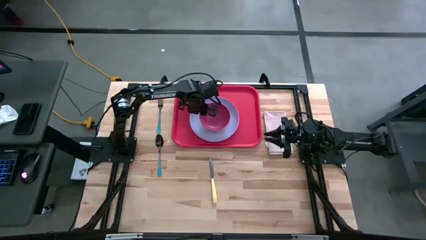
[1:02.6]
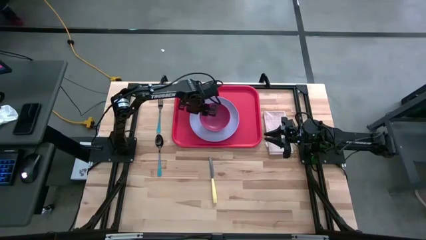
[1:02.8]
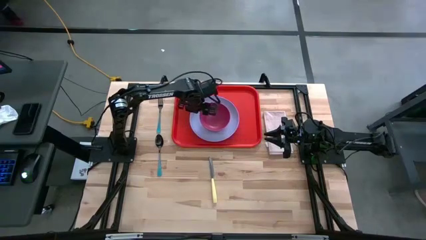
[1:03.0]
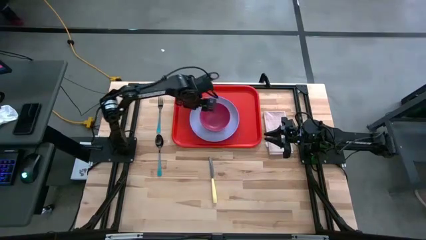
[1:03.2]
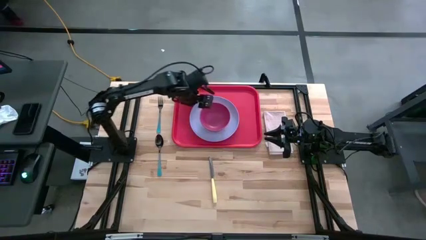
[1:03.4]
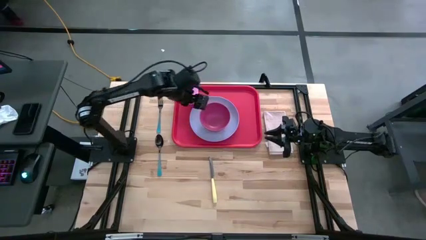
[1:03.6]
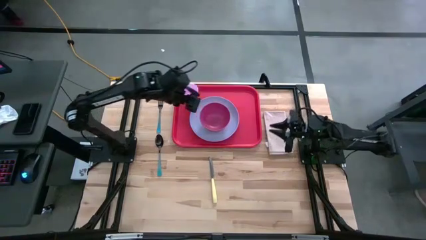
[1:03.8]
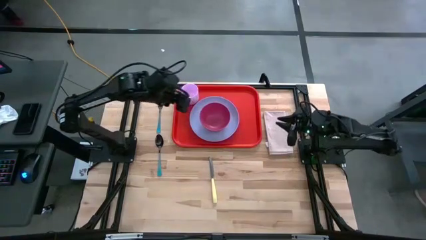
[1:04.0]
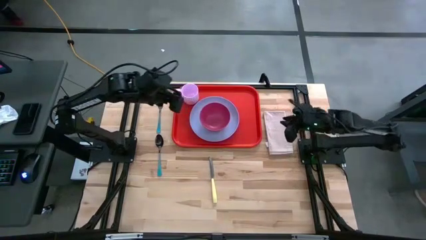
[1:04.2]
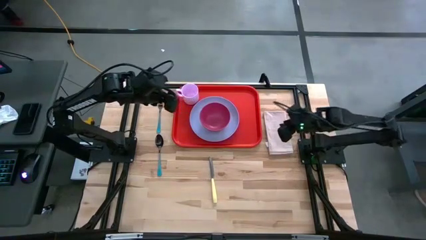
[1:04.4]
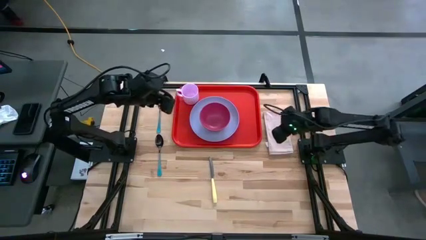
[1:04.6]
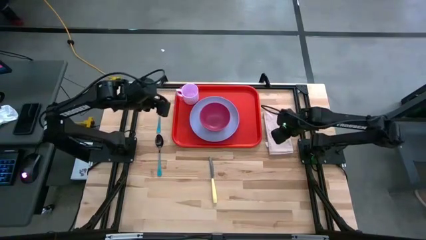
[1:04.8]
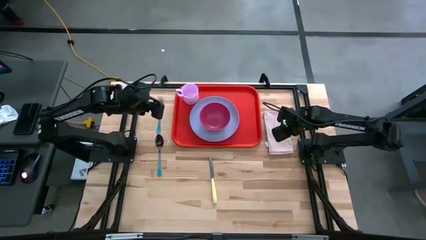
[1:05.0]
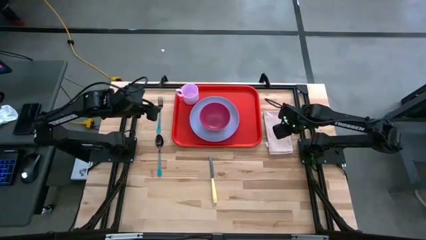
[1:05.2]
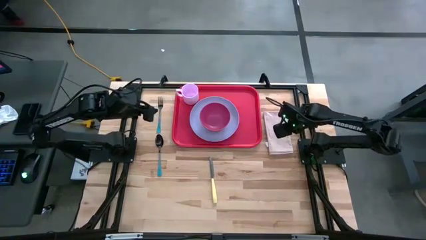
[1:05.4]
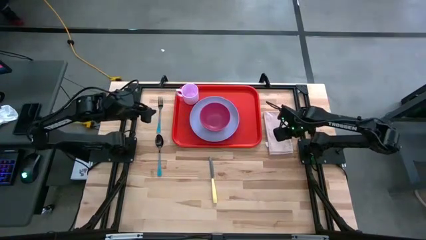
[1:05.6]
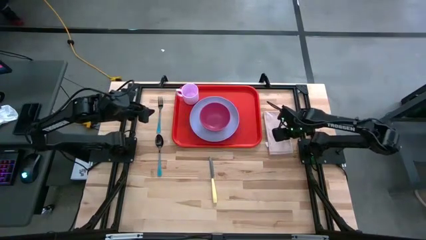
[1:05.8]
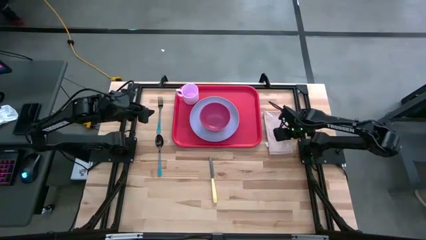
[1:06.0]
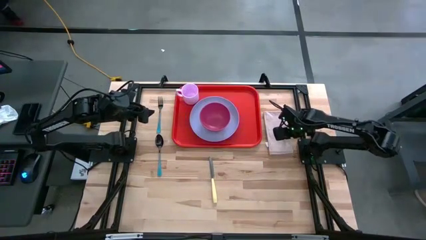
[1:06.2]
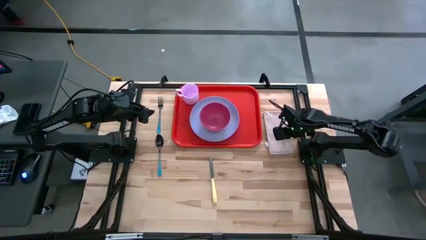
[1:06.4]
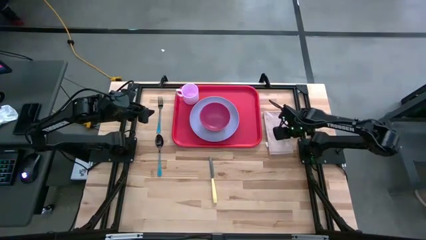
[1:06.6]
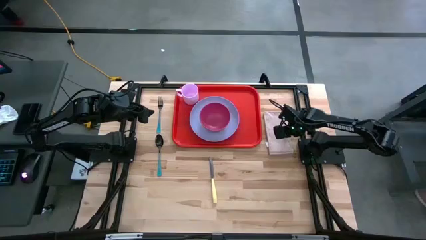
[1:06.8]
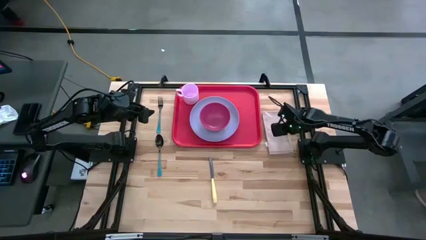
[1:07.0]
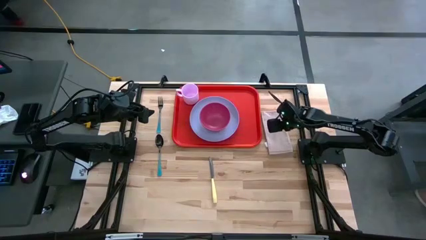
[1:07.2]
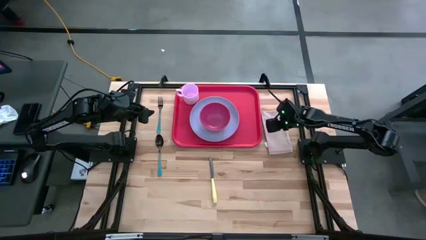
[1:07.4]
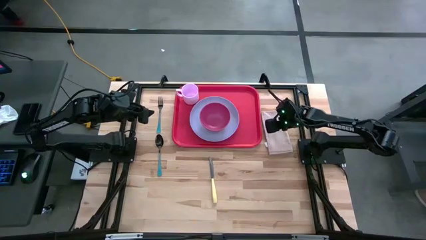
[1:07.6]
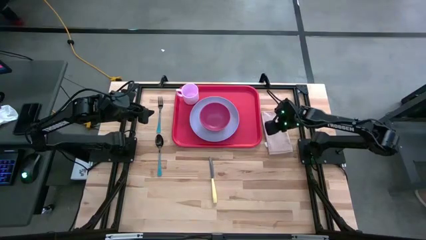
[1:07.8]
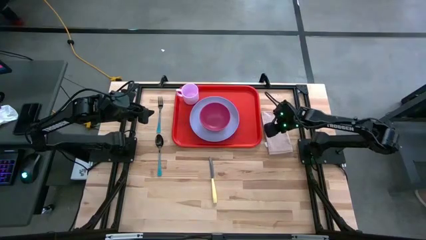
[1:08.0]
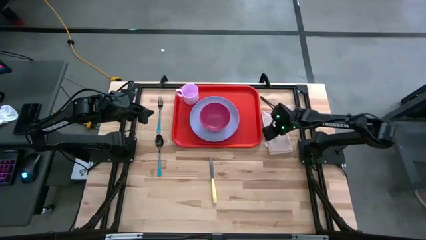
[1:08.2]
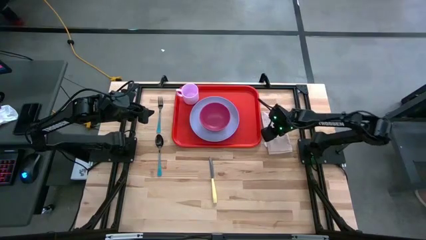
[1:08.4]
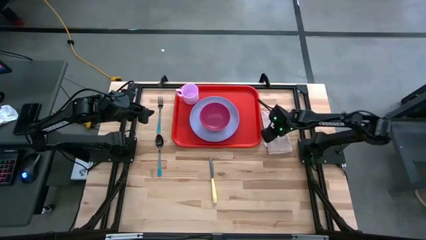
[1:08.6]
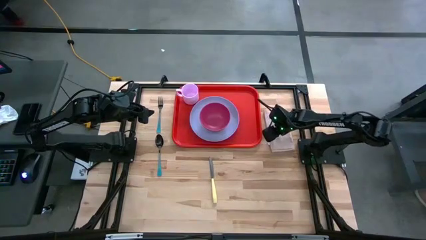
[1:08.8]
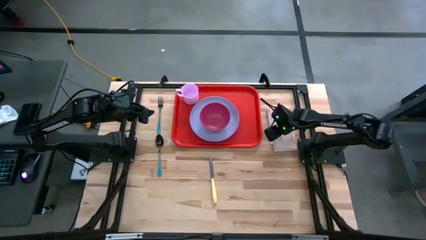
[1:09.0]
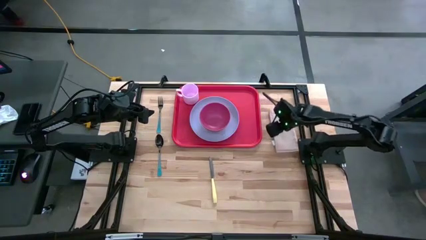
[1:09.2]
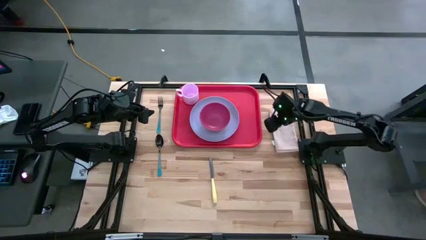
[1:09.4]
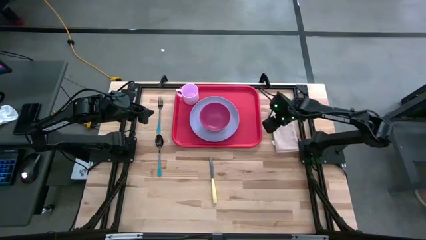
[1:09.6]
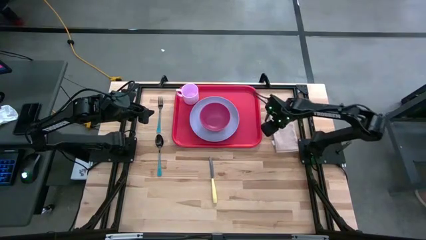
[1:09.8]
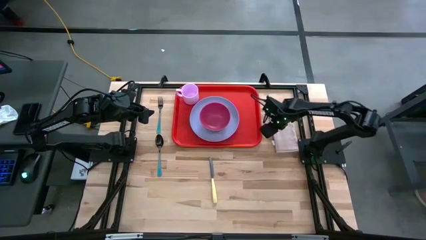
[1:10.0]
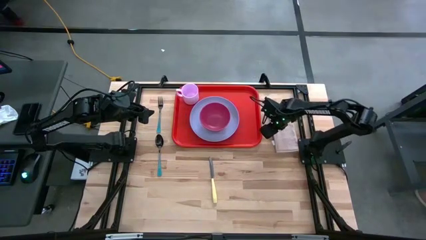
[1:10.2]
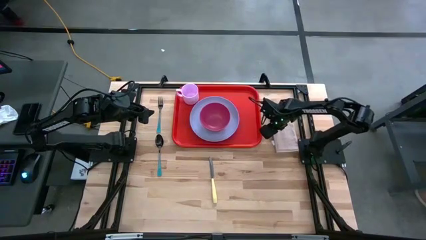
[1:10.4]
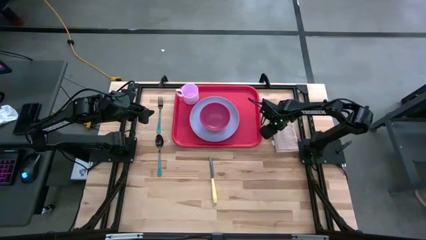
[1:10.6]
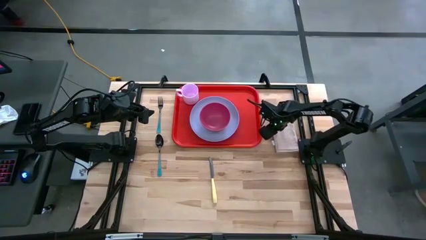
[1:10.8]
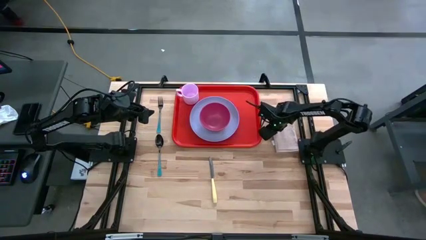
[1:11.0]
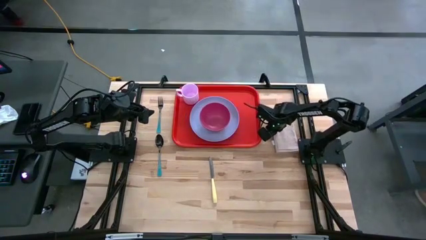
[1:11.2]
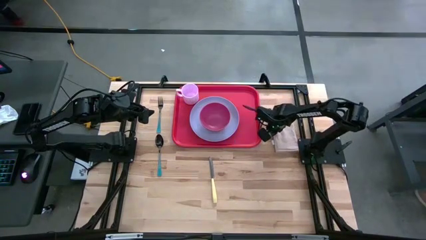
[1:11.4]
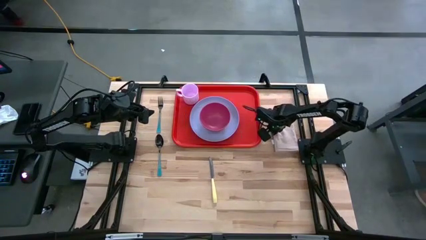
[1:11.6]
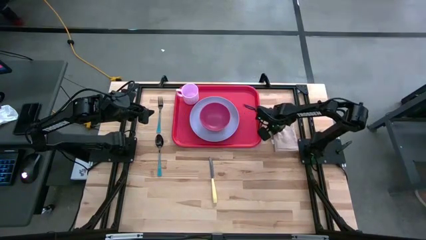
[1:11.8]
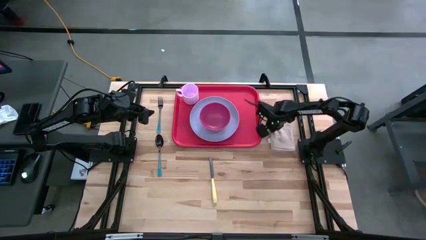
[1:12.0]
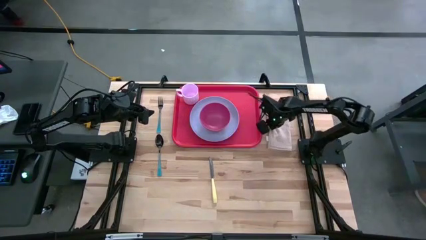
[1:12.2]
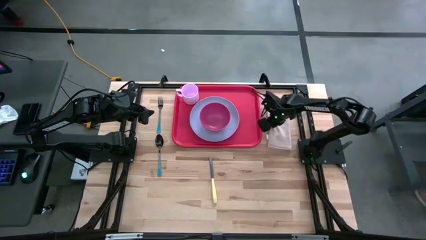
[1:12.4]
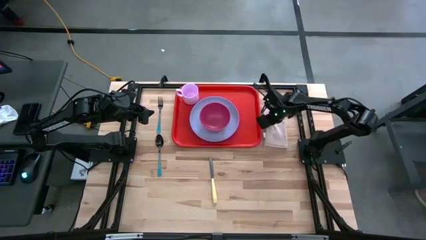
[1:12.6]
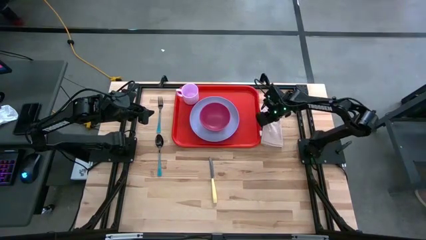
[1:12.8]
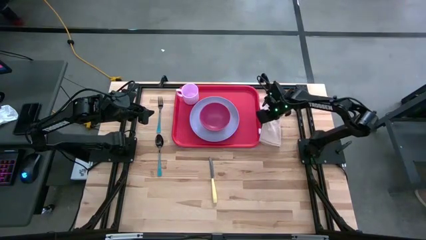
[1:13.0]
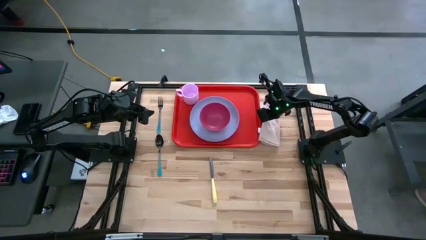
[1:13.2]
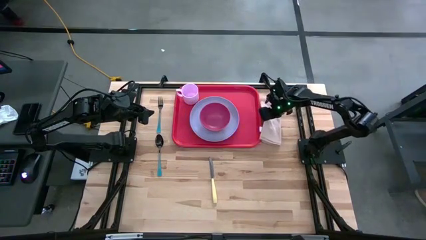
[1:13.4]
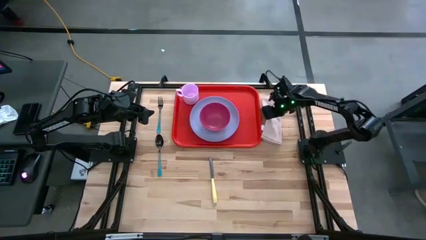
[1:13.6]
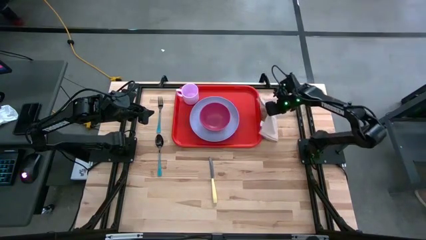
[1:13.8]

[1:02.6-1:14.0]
Task: Set up tray
Put the white napkin on the red tray to the left of the white plate

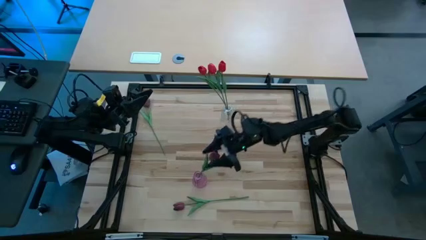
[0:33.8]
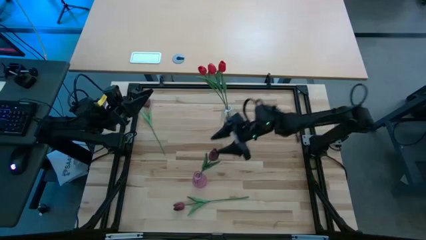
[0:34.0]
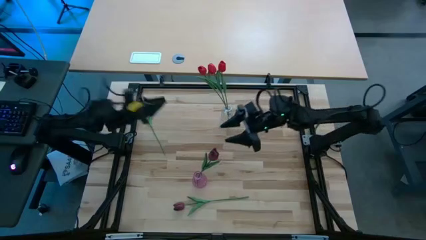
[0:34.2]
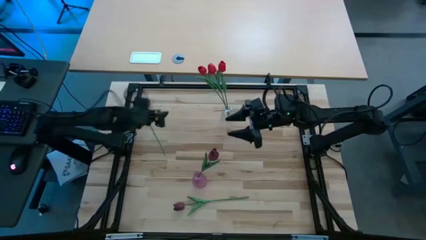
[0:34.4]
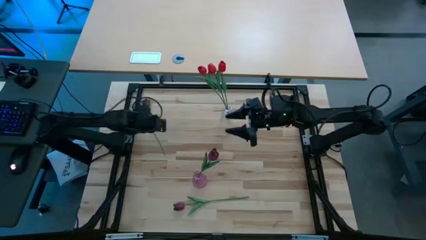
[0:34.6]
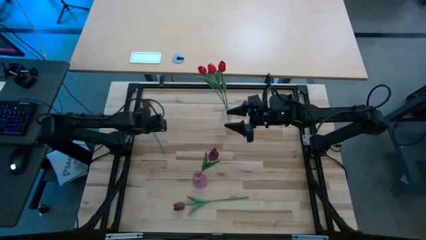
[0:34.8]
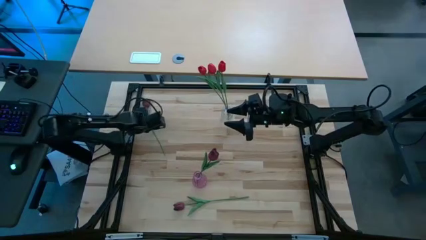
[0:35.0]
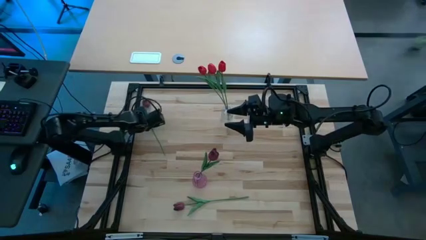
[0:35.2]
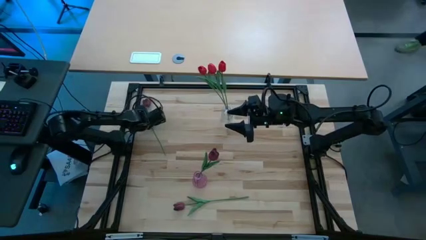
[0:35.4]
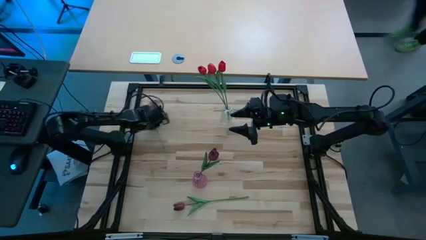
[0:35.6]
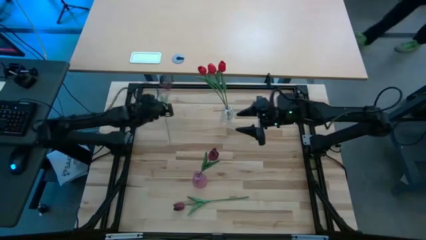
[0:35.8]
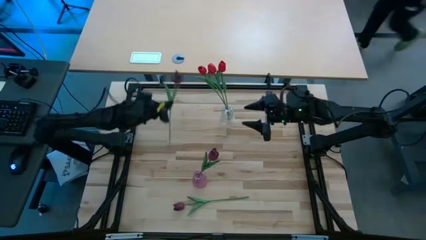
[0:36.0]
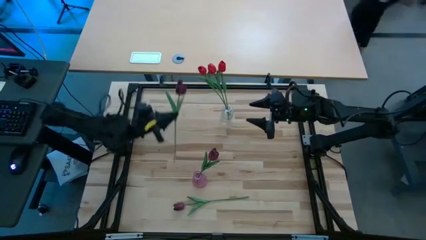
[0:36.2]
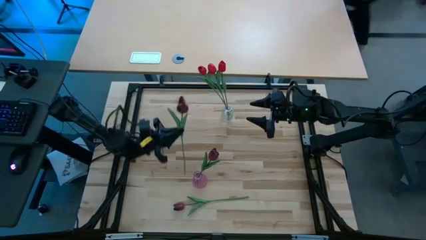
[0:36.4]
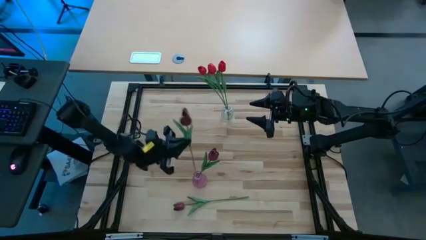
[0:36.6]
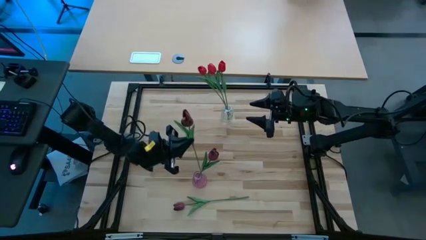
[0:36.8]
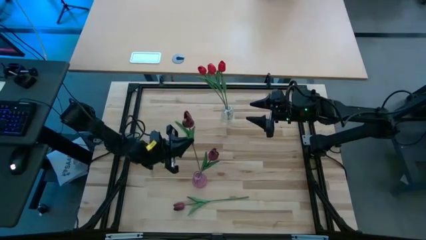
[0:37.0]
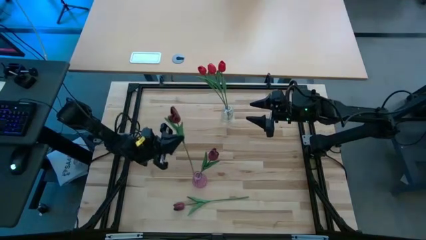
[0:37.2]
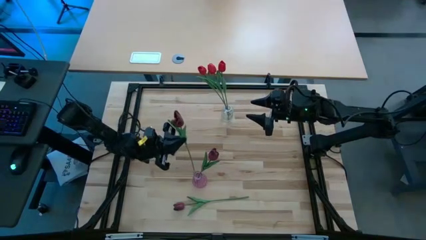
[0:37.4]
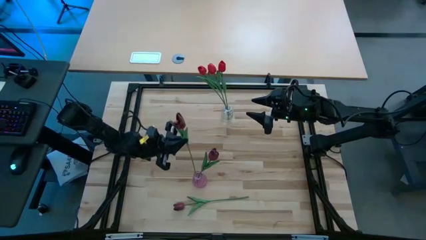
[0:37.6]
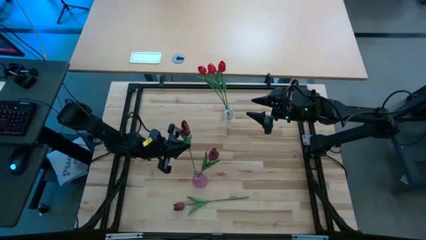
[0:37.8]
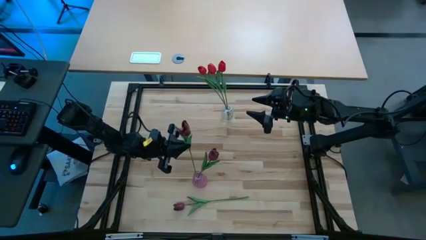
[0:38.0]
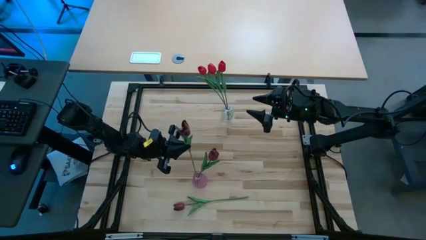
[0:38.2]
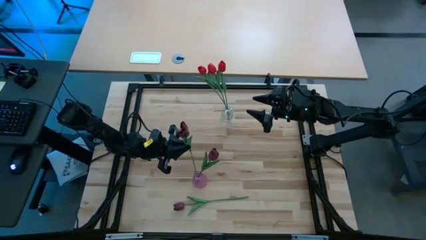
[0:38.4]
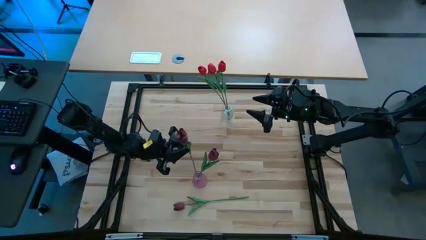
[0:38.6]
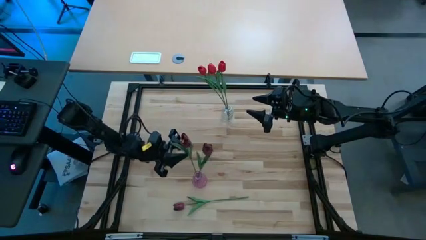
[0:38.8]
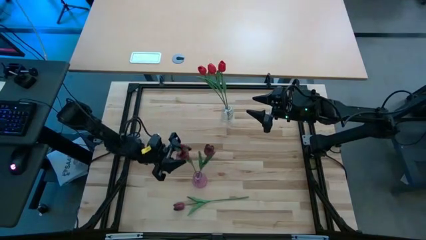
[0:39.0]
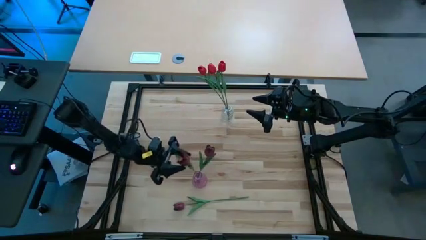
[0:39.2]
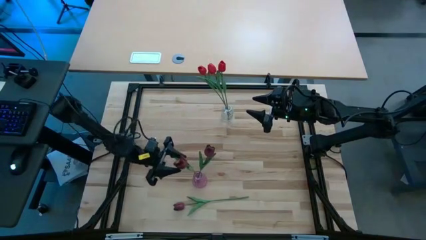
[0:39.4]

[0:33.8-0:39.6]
Task: Sort flowers into vase by color
Put the top dark red tulip into the violet flower vase
